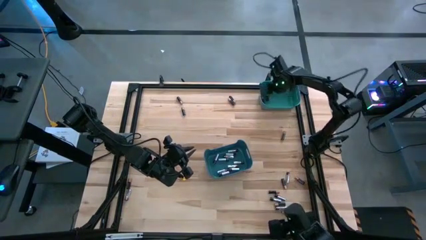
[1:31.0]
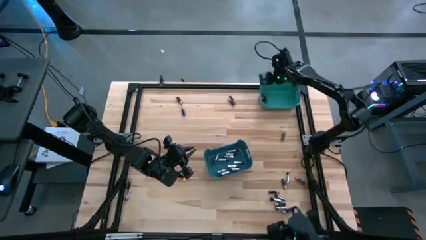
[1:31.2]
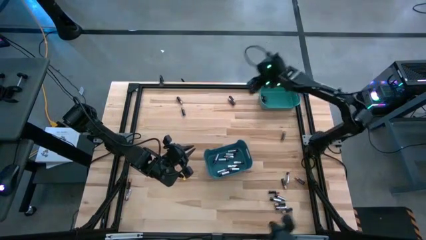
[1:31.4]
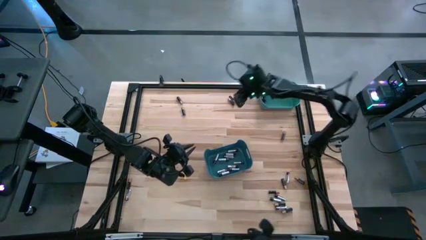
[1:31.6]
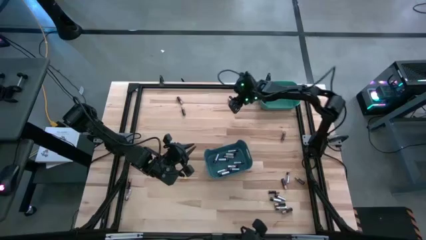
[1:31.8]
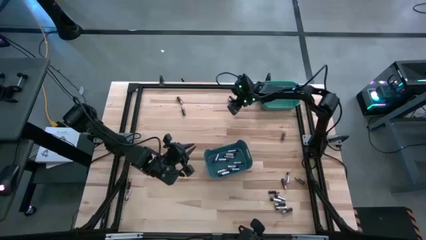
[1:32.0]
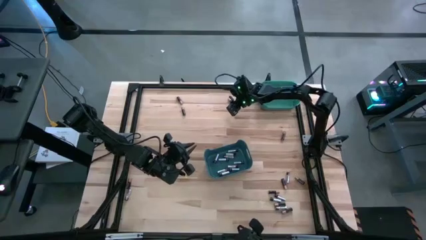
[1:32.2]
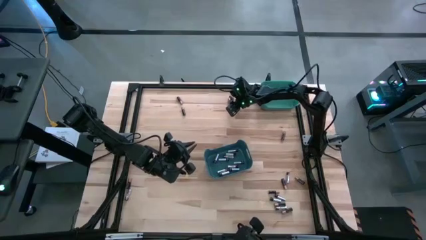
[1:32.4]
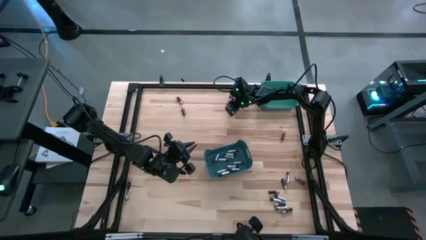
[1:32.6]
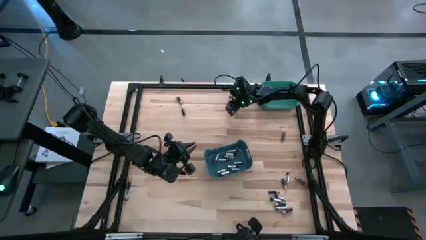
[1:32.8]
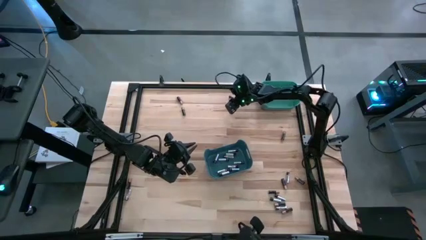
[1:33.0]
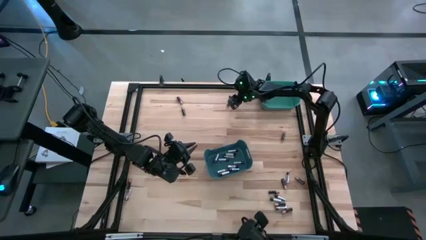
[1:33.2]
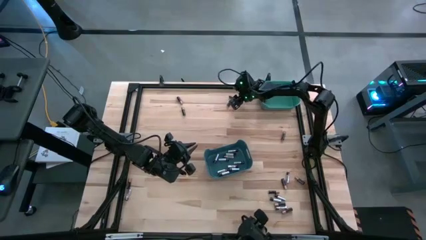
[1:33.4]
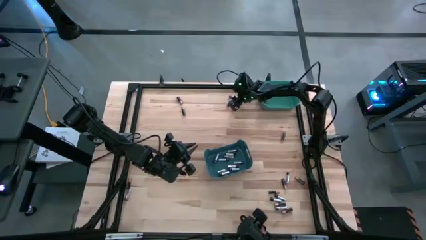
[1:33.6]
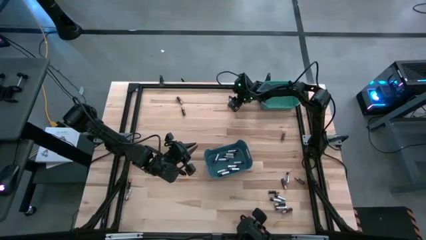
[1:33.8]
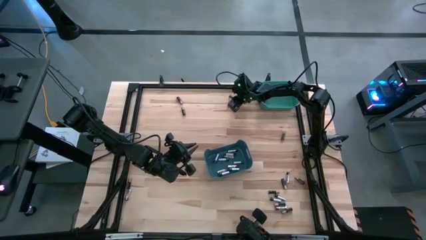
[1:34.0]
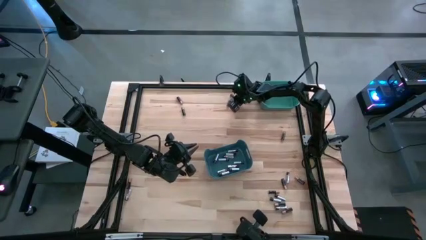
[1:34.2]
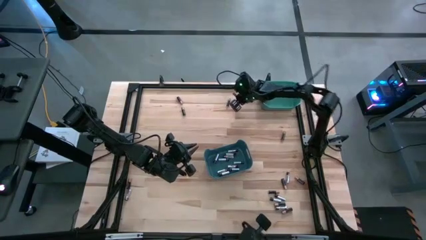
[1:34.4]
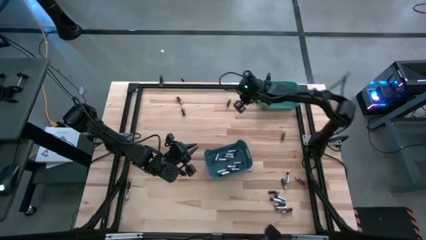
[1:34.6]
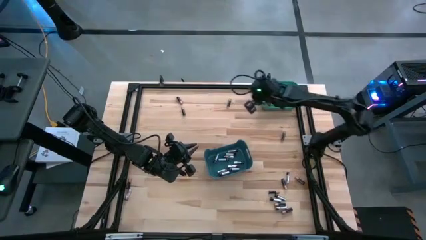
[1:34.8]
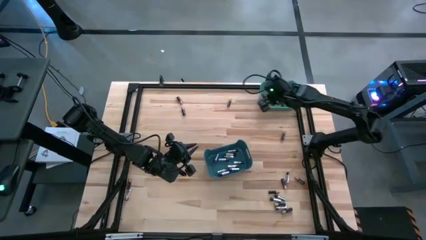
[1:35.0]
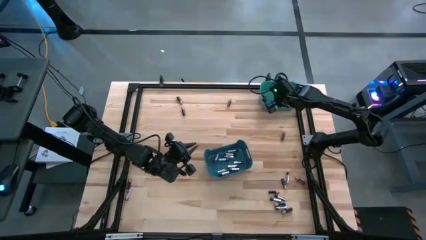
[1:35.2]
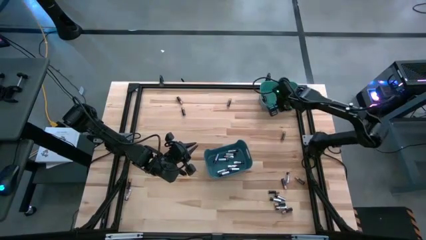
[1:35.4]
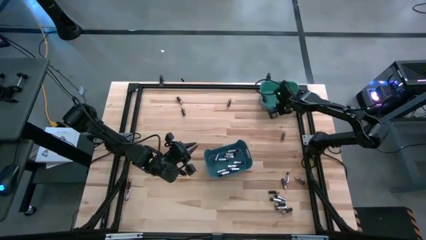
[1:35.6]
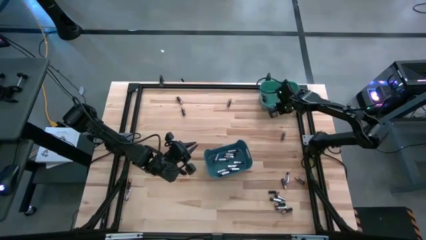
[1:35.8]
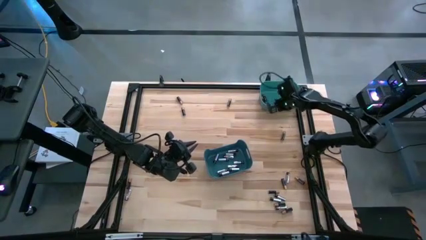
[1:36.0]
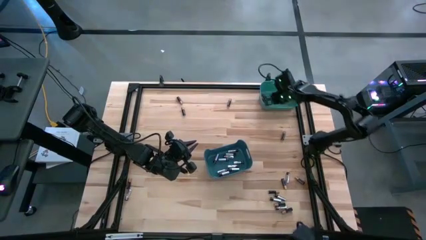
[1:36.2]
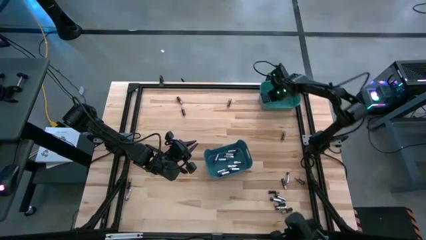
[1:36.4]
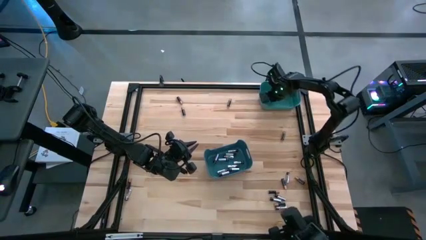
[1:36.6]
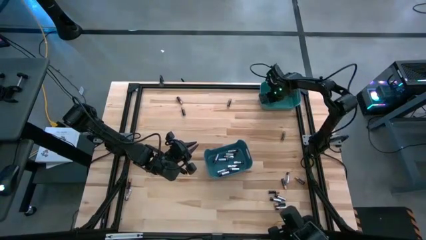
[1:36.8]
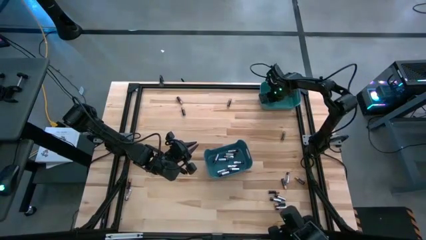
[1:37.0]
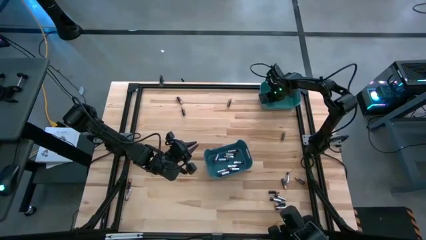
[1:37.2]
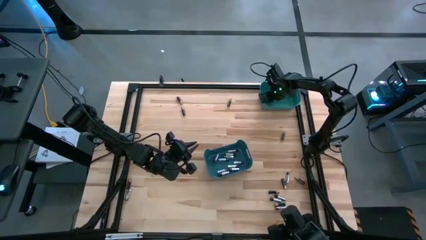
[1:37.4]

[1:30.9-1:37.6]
Task: Sort batteries
Put the black battery into the green bin

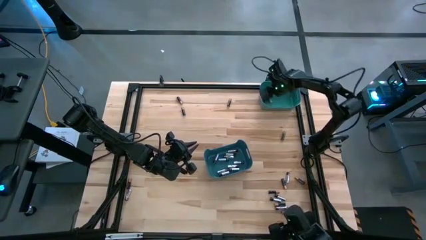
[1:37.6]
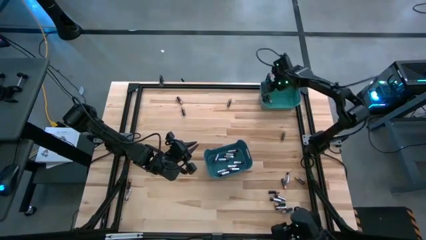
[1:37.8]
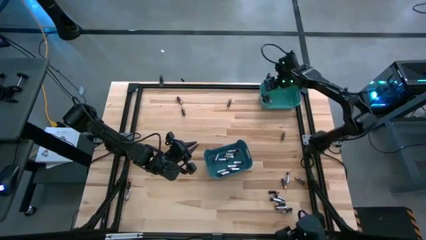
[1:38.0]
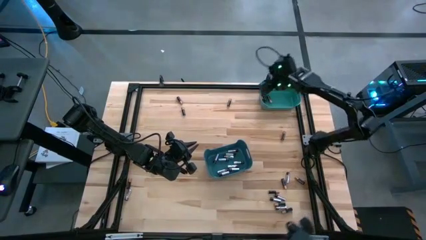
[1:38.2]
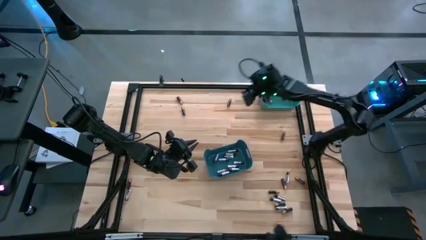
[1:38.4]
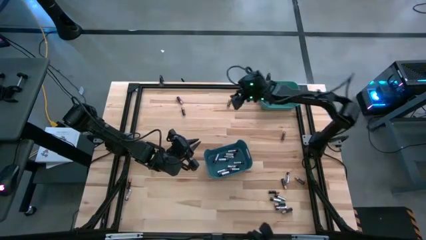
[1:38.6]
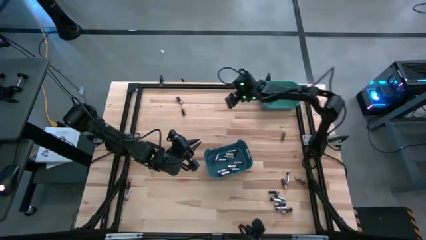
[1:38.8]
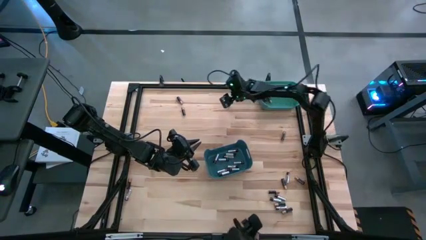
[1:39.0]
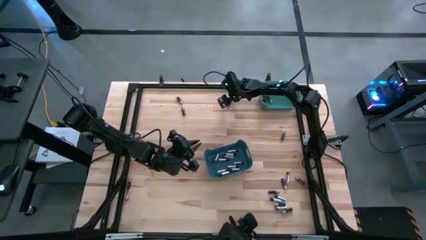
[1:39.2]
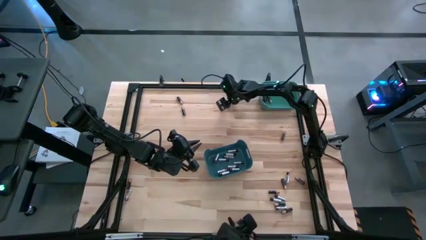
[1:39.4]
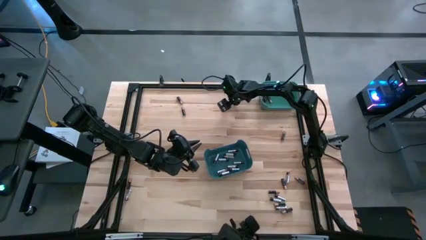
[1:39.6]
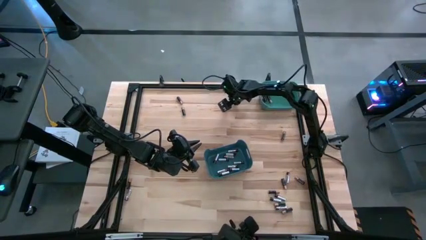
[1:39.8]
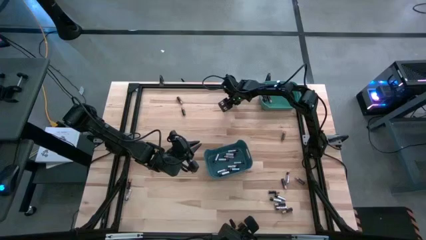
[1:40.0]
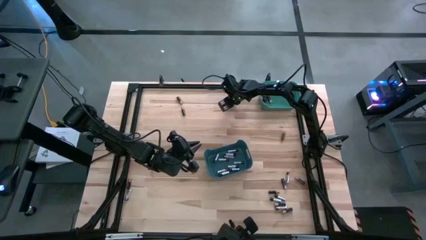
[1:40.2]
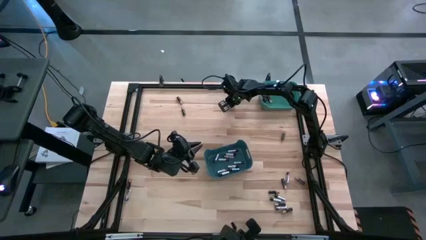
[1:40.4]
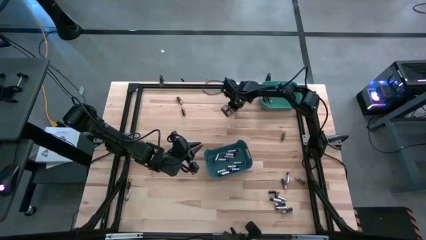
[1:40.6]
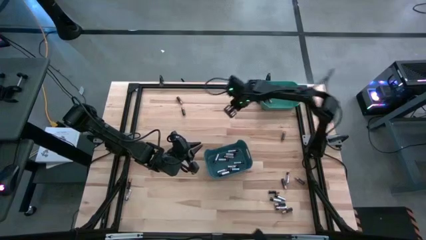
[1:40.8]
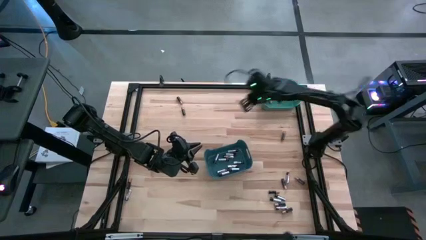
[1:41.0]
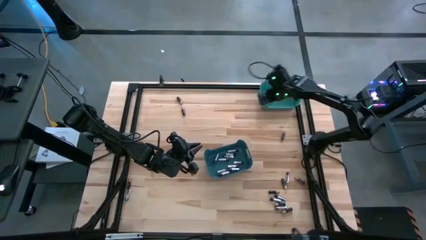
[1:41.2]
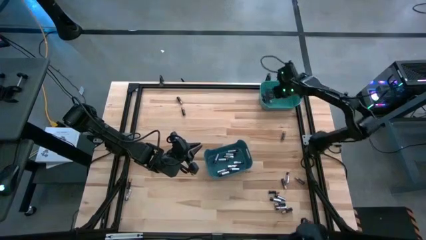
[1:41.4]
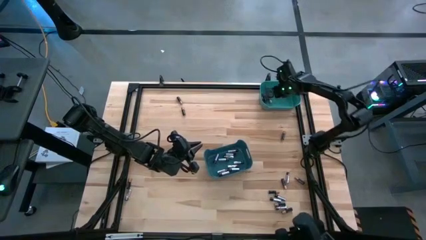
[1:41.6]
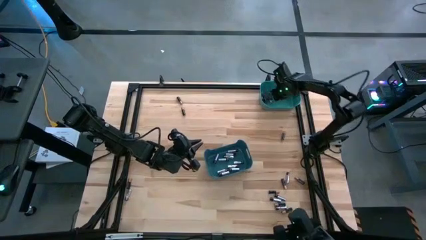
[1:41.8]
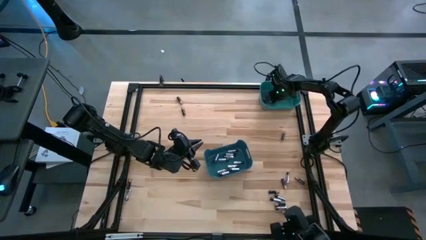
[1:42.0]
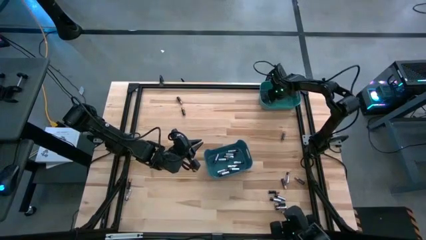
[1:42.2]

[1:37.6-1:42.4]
Put the black battery into the green bin

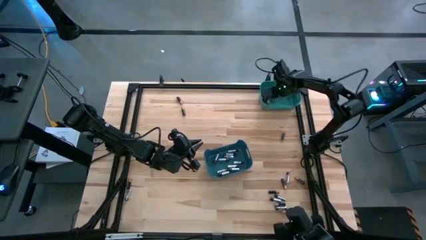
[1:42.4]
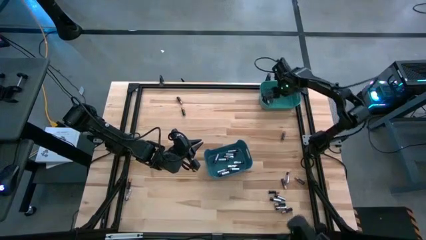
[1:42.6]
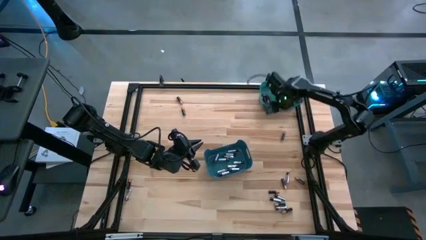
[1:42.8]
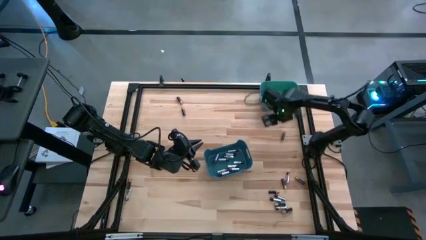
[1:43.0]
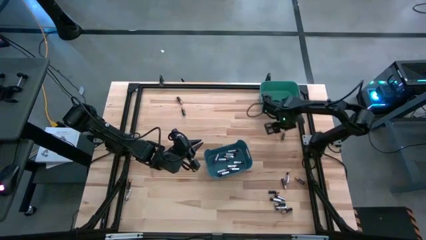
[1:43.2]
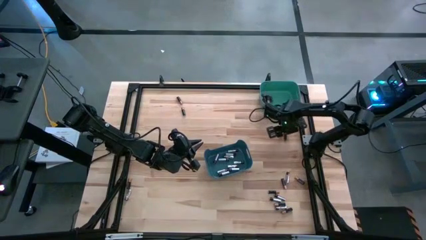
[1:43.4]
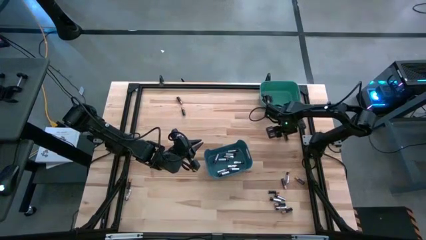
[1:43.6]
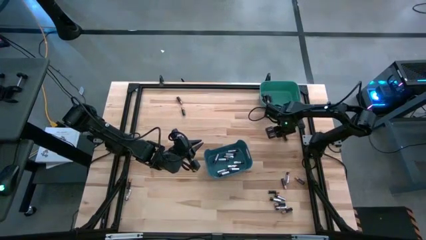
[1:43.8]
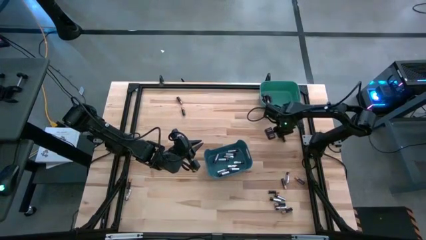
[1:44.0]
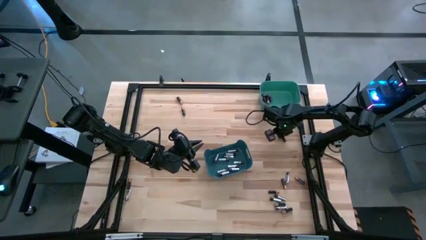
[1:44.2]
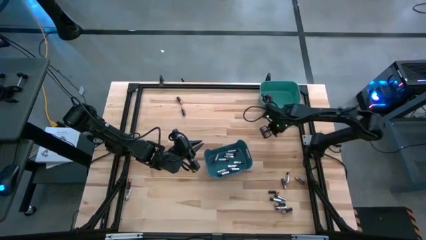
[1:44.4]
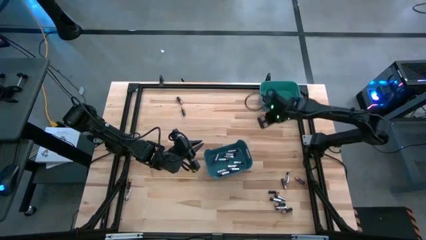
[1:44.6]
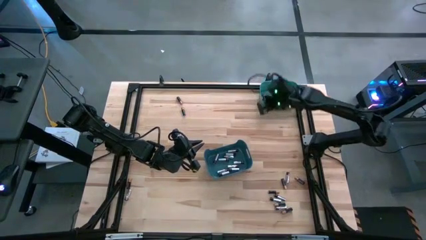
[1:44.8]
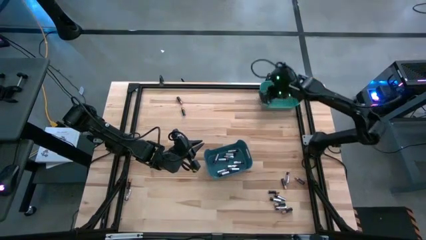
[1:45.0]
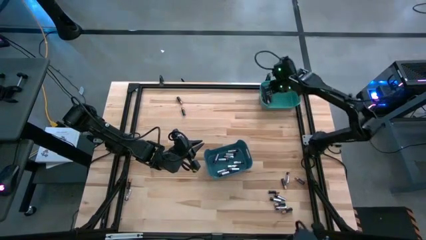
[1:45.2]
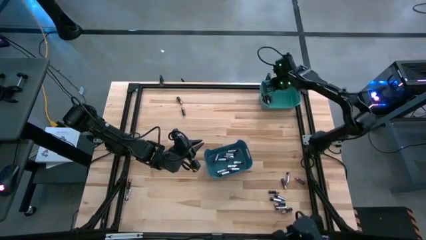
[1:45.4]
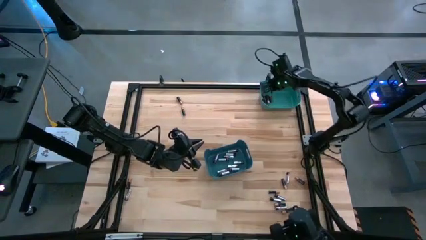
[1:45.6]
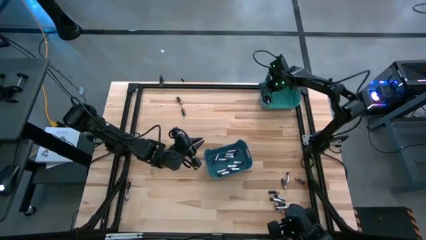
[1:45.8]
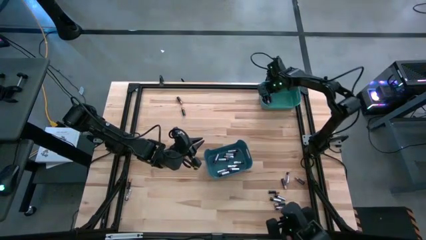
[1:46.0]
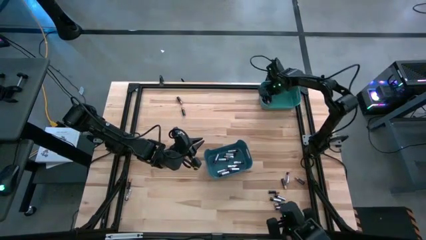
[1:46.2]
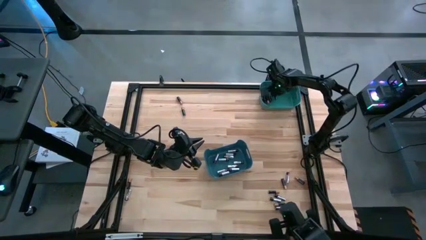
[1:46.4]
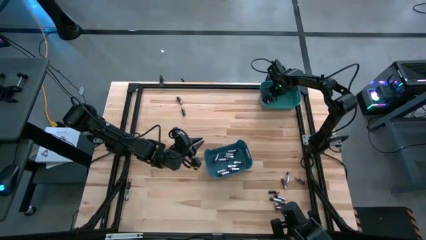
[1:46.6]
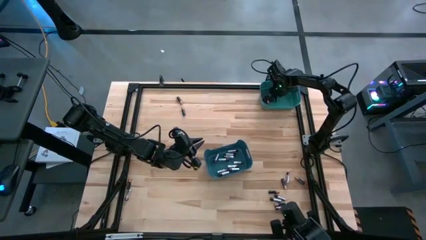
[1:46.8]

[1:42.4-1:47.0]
Put the black battery into the green bin
